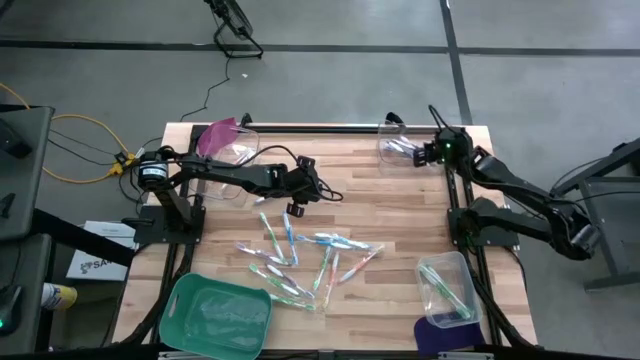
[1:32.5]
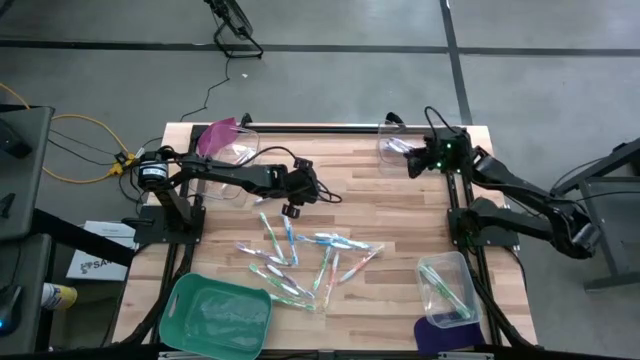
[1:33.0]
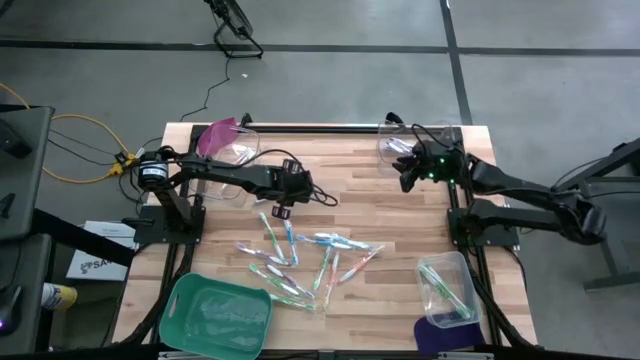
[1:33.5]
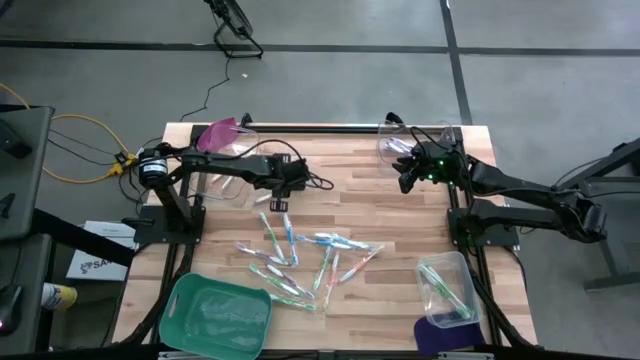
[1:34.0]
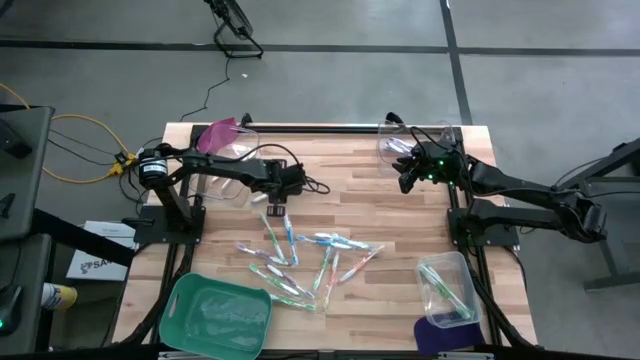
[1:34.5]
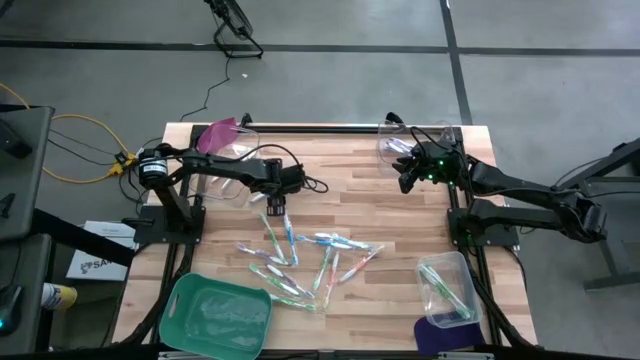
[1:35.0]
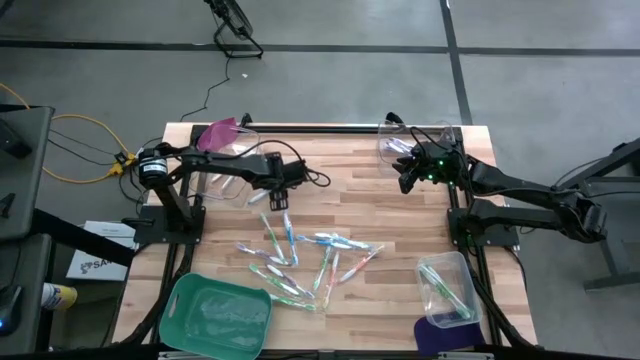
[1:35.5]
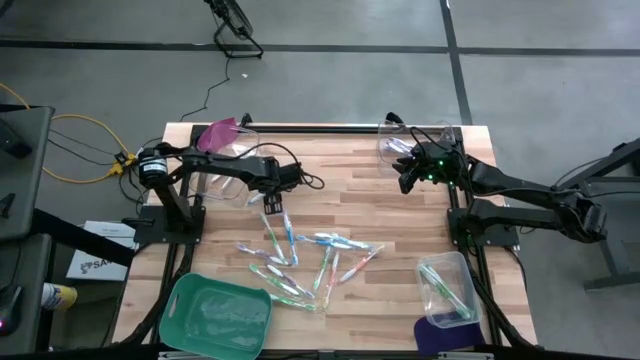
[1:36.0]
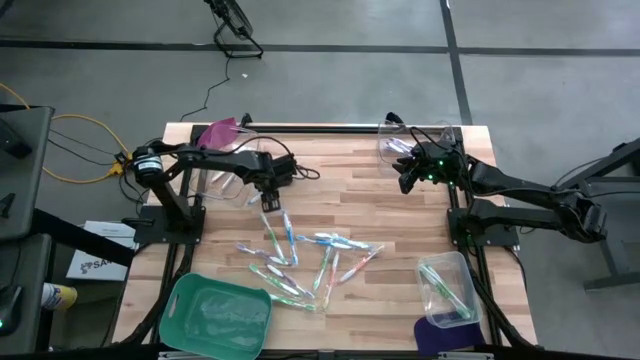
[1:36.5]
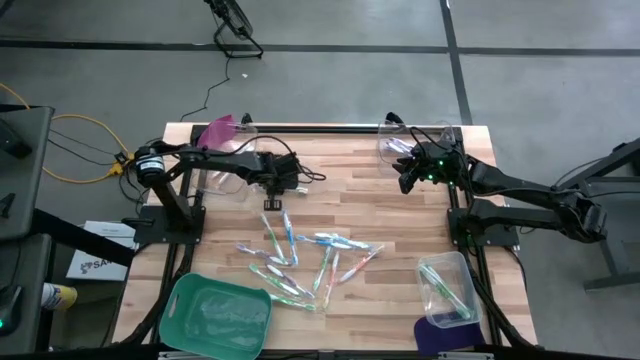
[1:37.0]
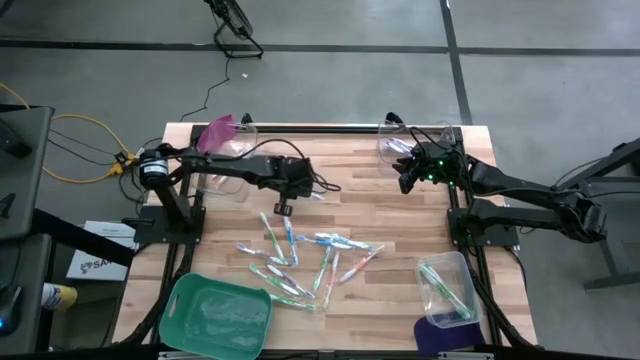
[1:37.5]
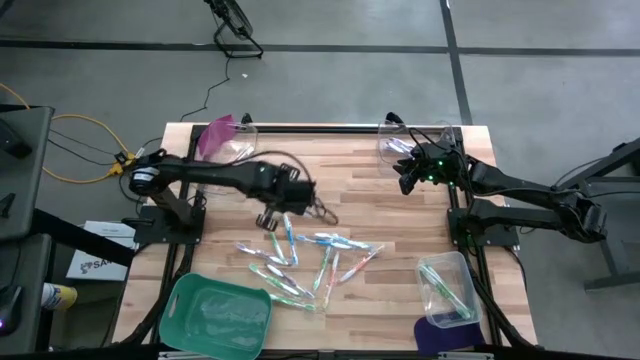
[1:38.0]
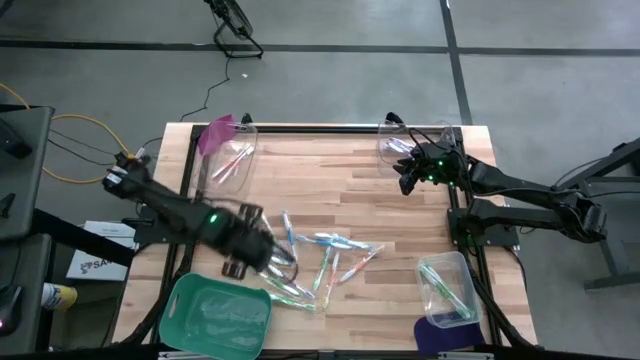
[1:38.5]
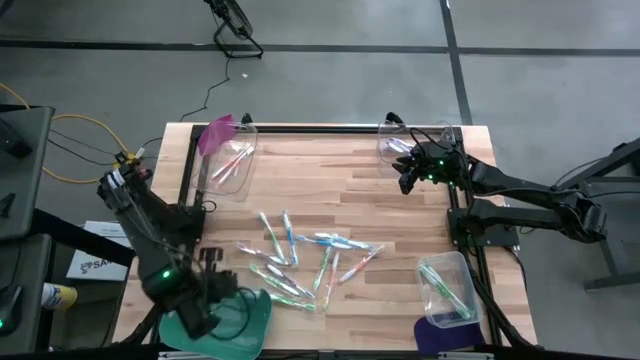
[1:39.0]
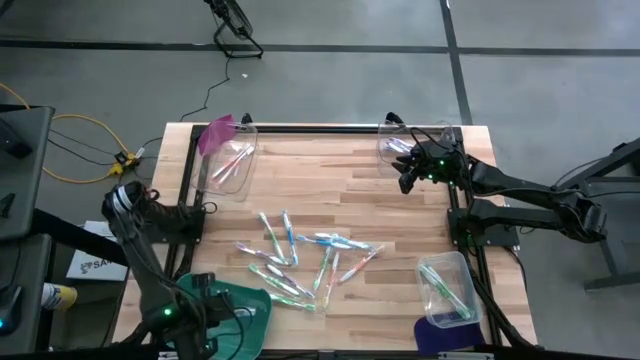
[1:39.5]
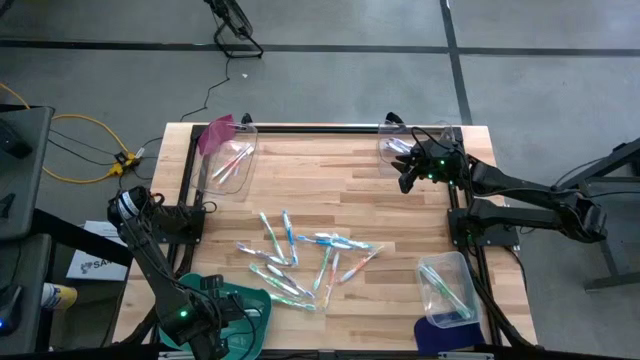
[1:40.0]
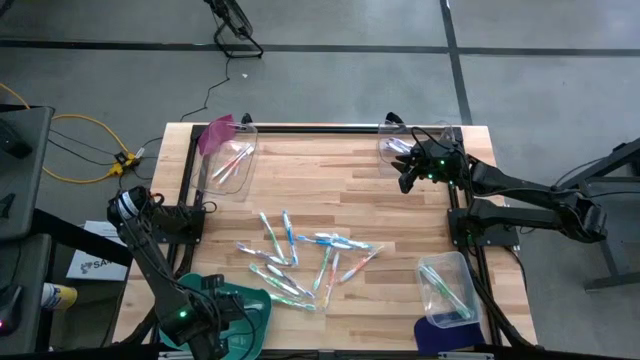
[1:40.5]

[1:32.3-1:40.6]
Task: Pick & Place Toothbrushes
Put the blue toothbrush into the green bin

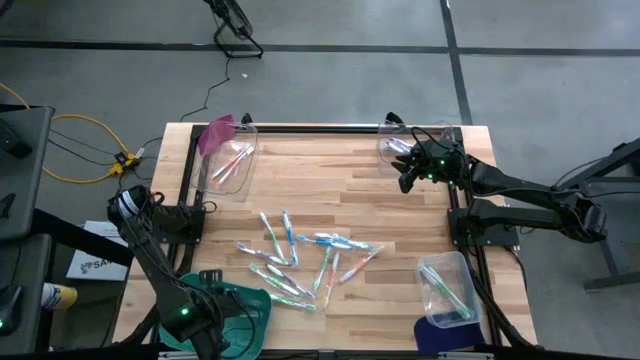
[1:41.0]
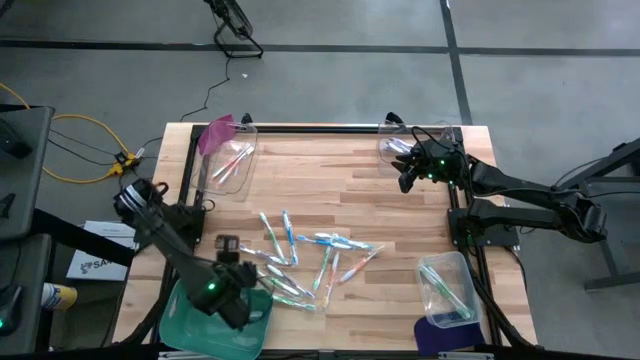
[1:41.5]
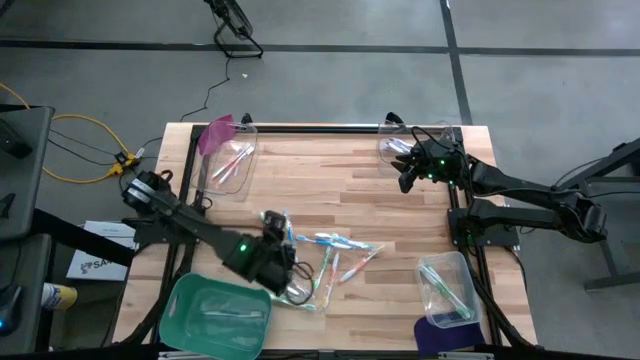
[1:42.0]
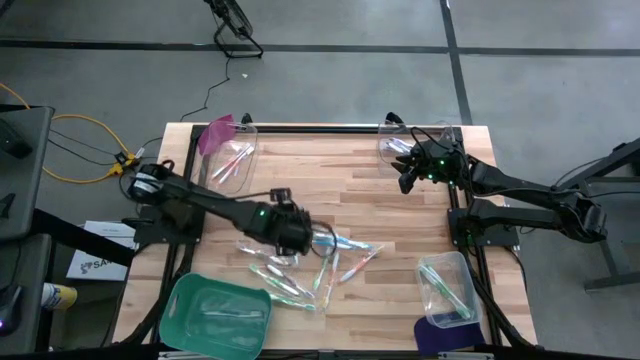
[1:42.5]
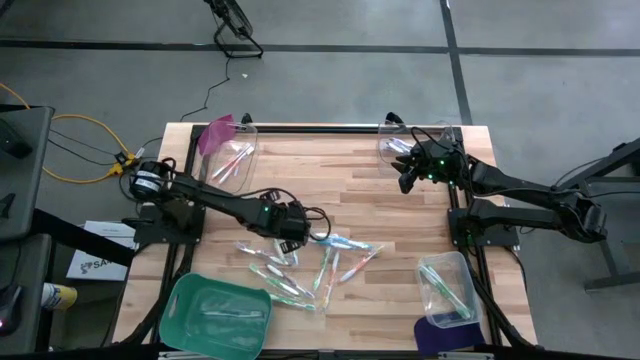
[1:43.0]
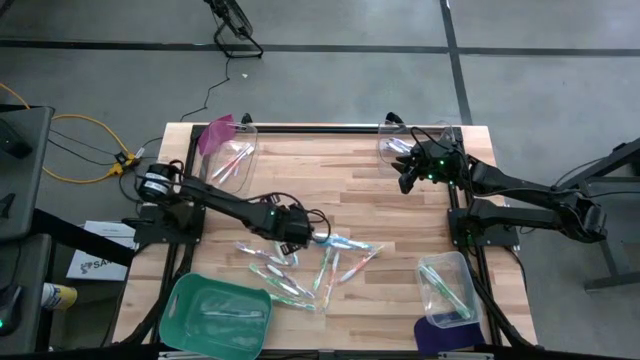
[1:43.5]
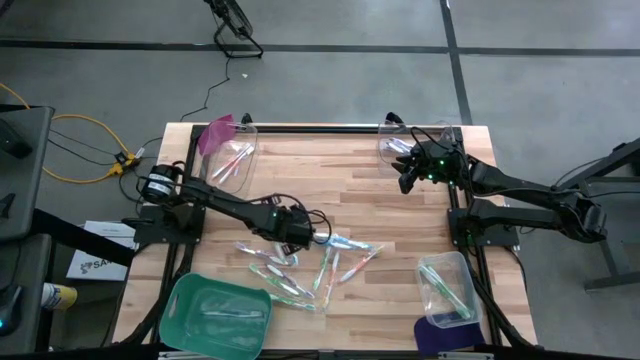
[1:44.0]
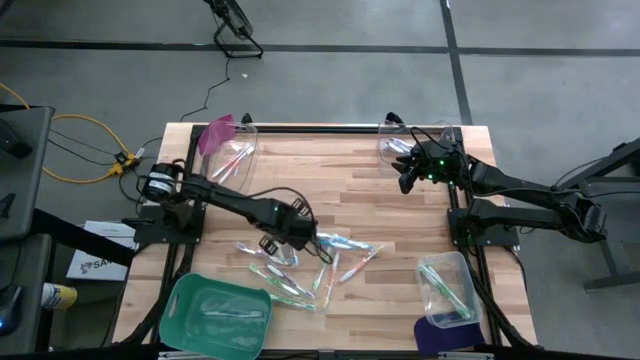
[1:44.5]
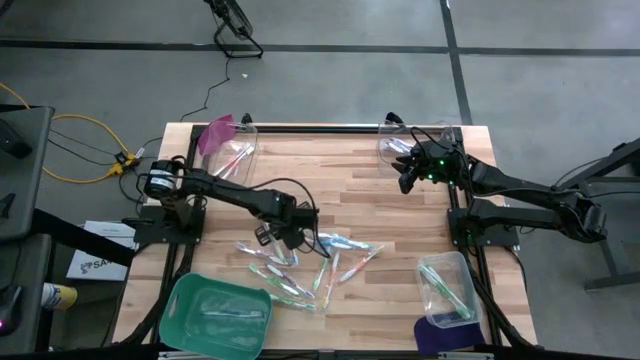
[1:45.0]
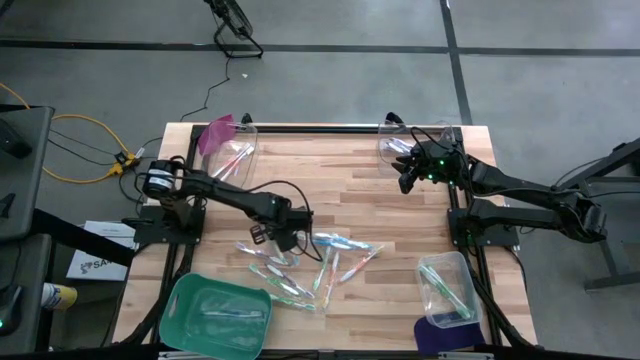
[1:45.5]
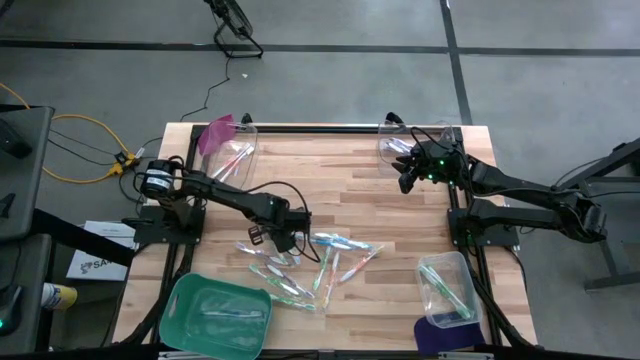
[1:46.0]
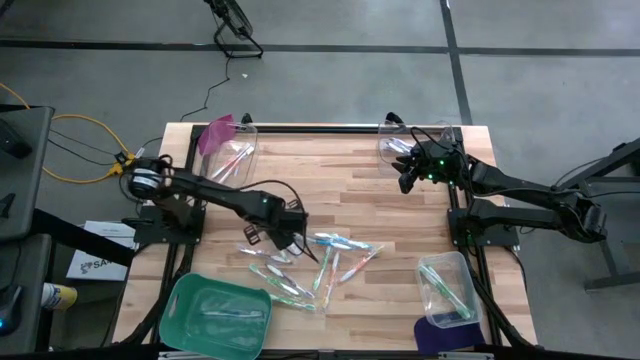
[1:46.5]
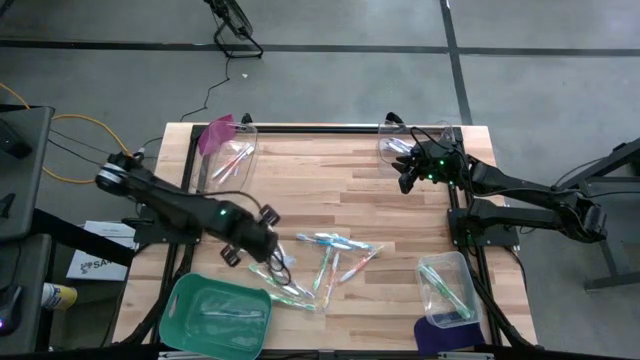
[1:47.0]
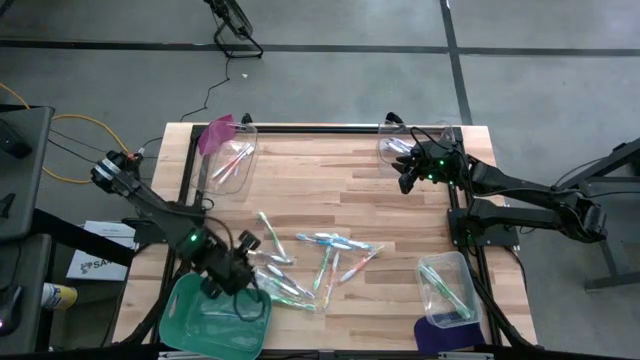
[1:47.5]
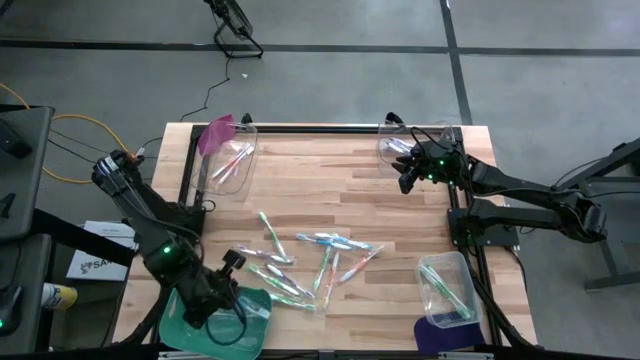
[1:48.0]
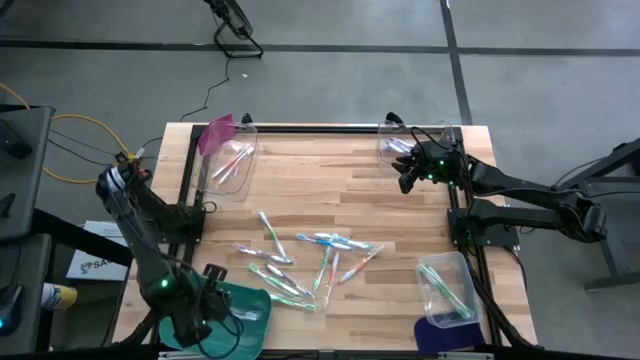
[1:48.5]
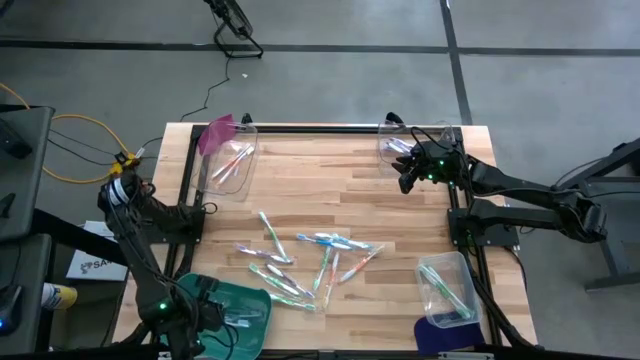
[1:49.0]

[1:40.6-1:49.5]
Put the blue toothbrush into the green bin

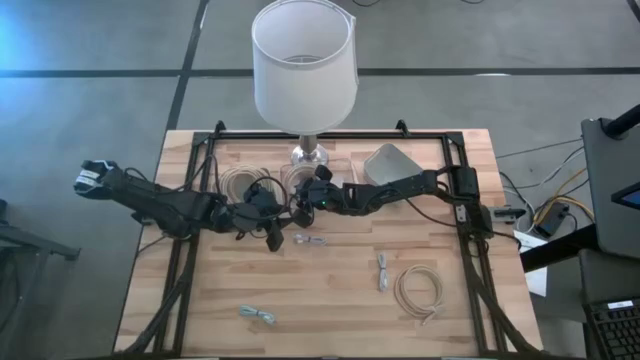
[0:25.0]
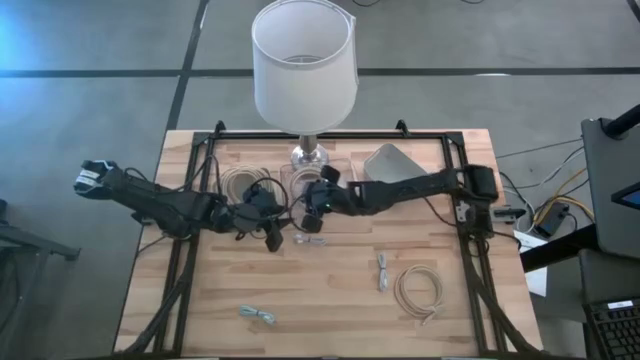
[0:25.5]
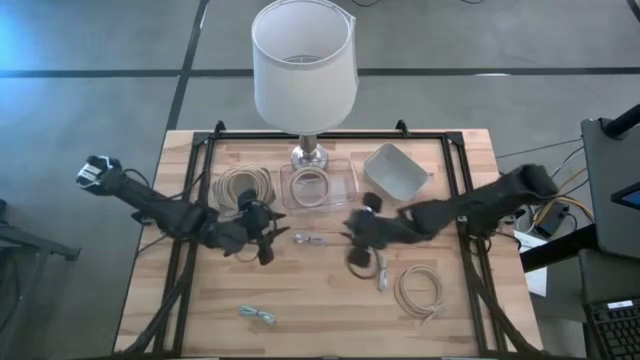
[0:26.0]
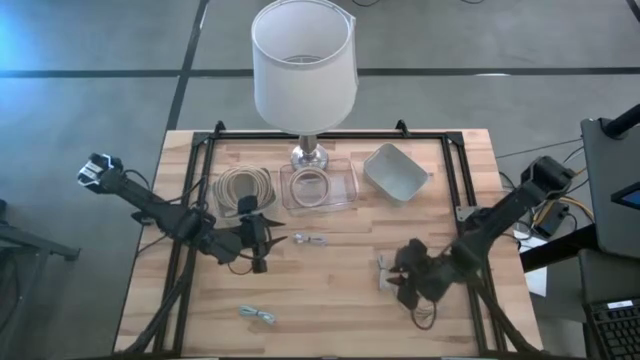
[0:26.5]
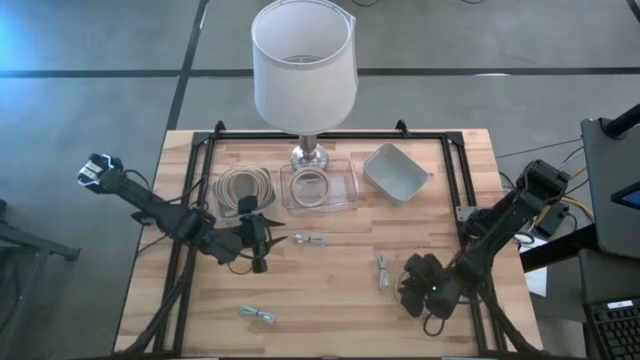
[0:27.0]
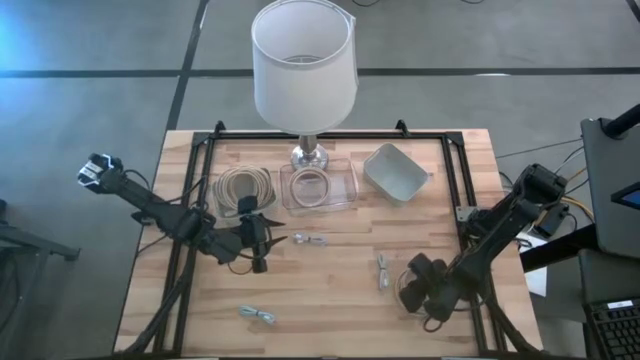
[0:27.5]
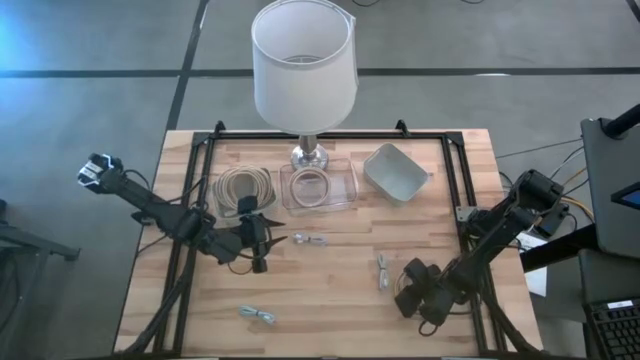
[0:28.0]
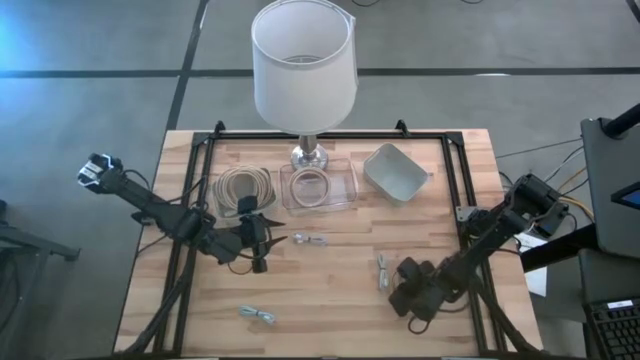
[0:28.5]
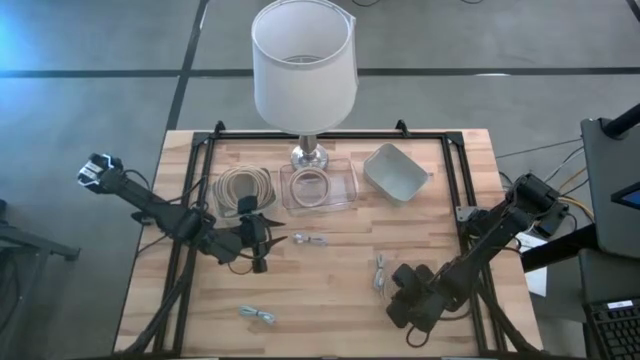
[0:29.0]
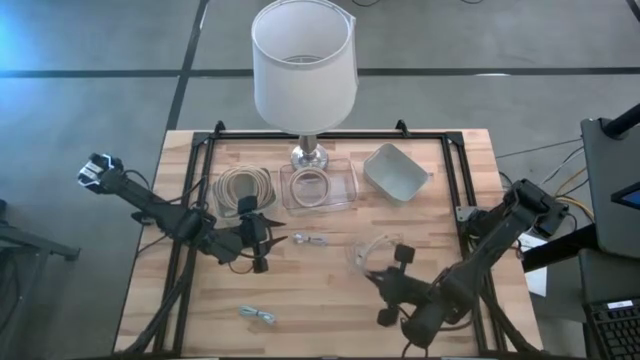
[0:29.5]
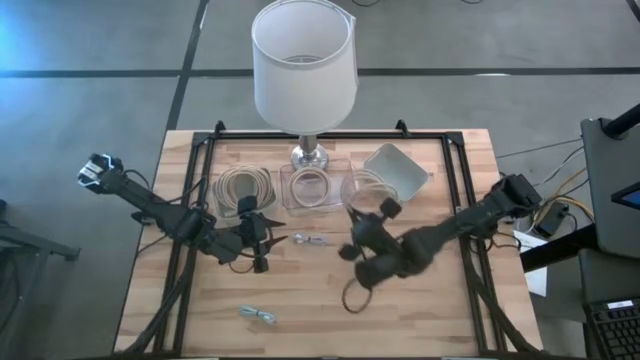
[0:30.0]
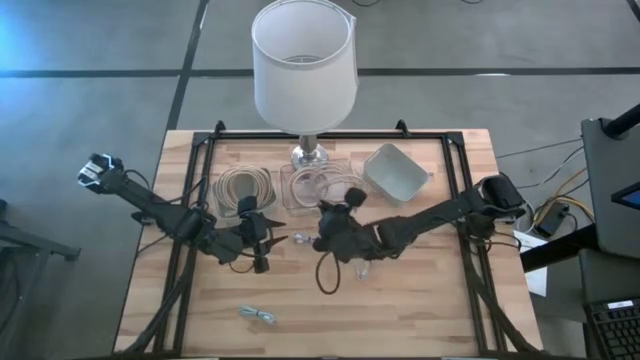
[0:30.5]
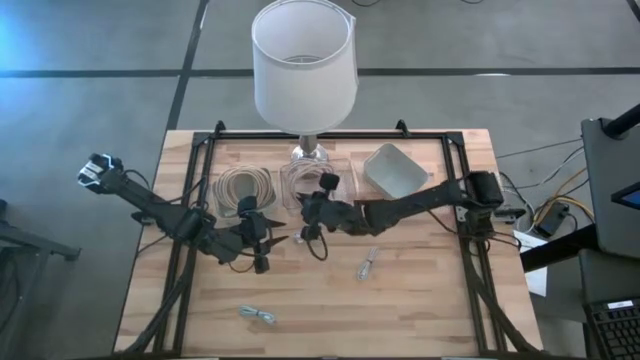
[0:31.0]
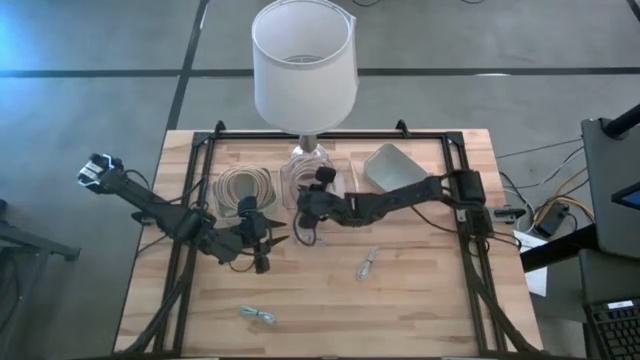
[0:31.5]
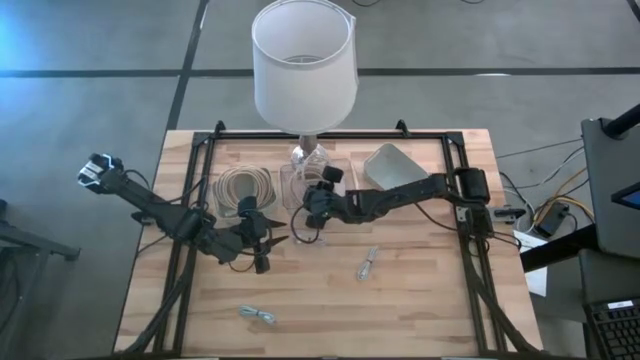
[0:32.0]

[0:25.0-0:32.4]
Task: Pick & Place USB Port
Put the light brown hdmi cable into the transparent bin
